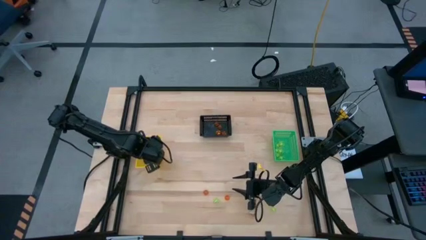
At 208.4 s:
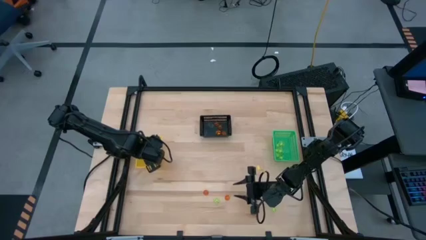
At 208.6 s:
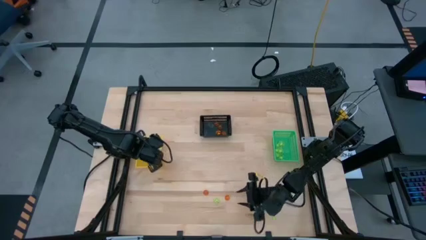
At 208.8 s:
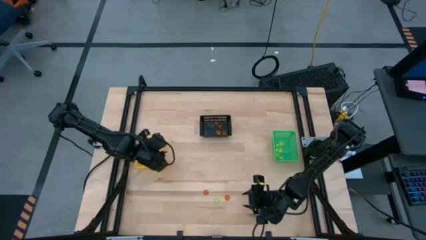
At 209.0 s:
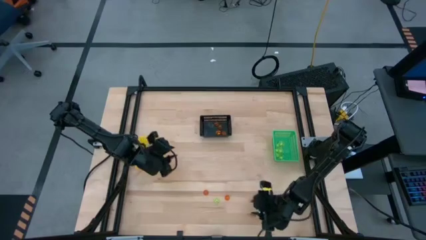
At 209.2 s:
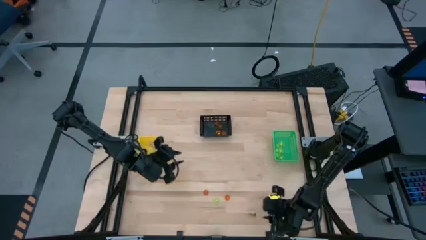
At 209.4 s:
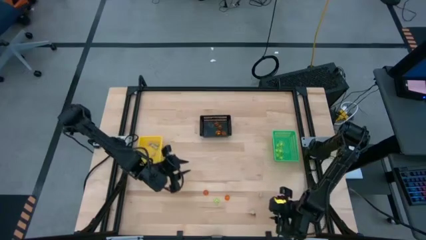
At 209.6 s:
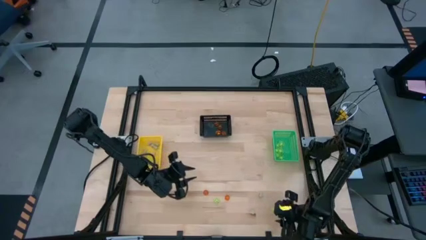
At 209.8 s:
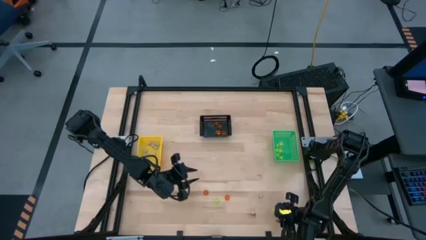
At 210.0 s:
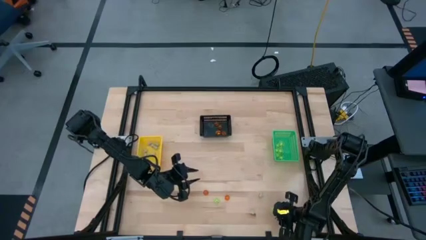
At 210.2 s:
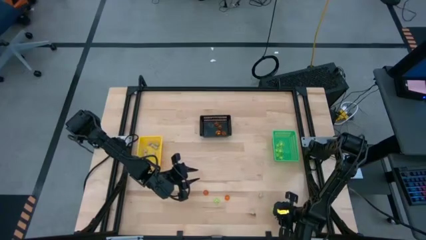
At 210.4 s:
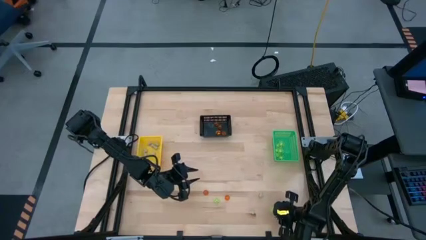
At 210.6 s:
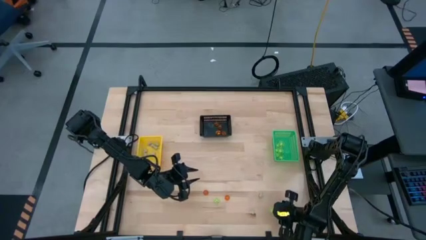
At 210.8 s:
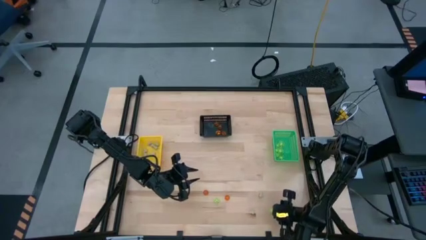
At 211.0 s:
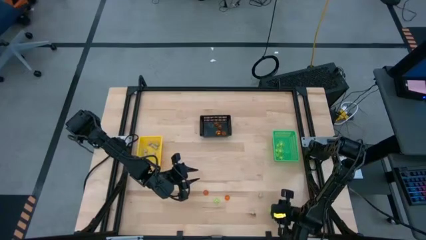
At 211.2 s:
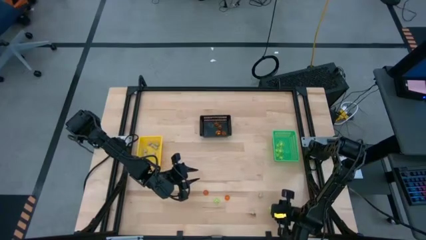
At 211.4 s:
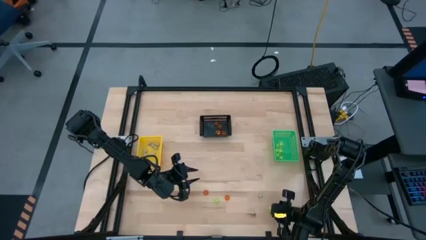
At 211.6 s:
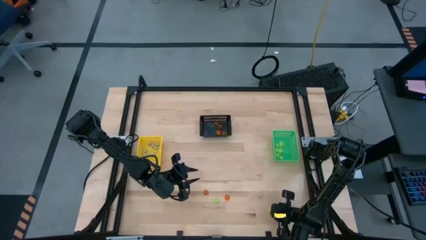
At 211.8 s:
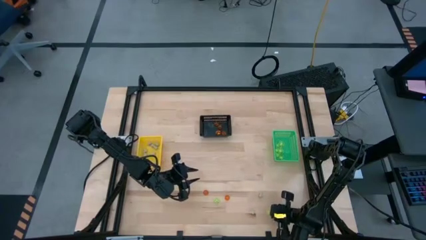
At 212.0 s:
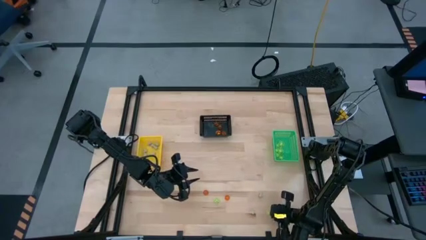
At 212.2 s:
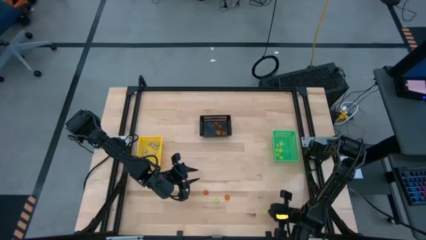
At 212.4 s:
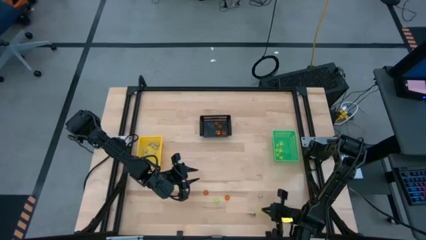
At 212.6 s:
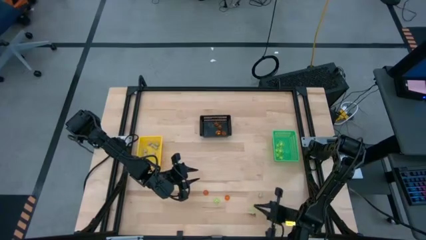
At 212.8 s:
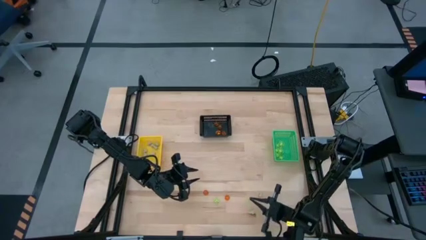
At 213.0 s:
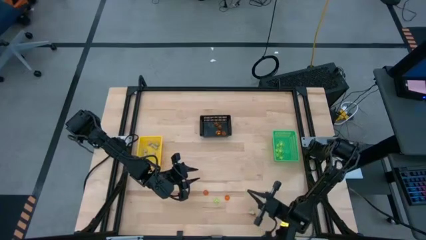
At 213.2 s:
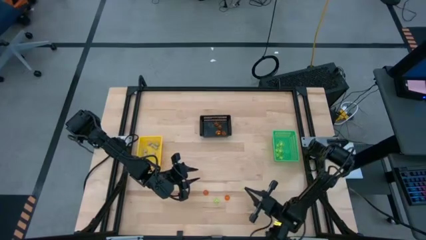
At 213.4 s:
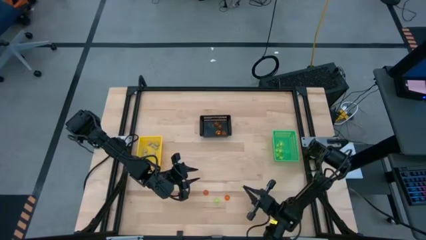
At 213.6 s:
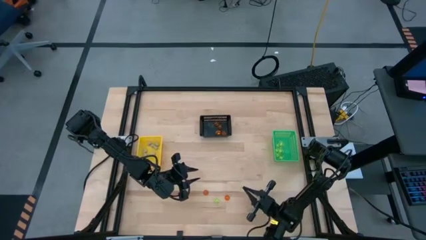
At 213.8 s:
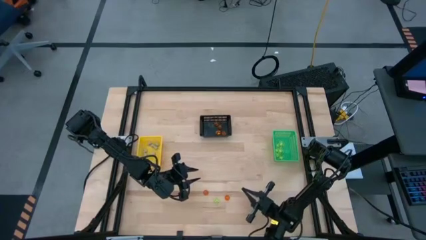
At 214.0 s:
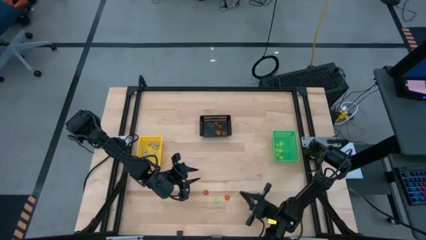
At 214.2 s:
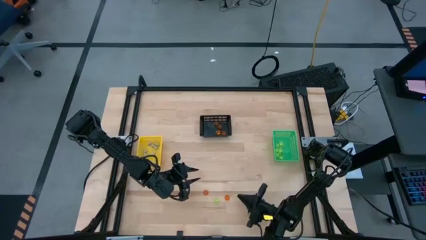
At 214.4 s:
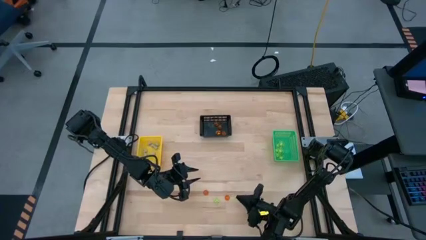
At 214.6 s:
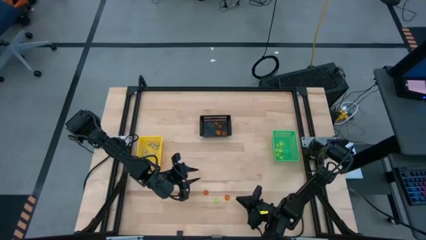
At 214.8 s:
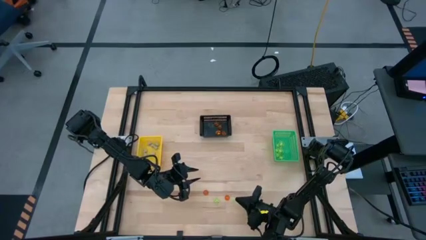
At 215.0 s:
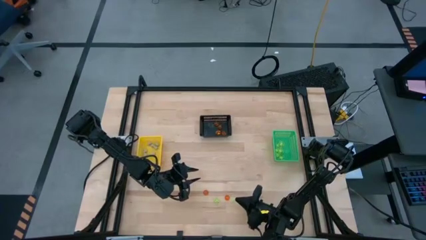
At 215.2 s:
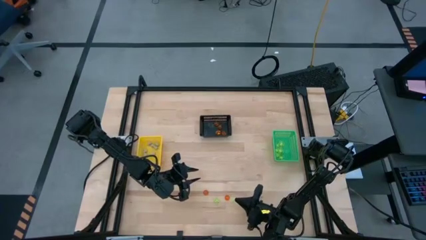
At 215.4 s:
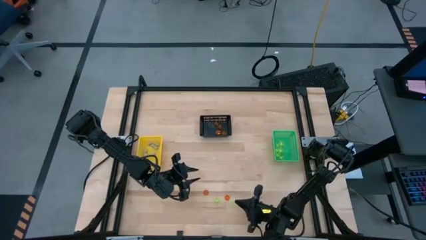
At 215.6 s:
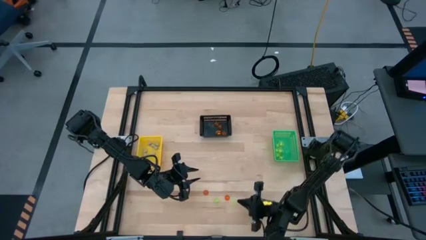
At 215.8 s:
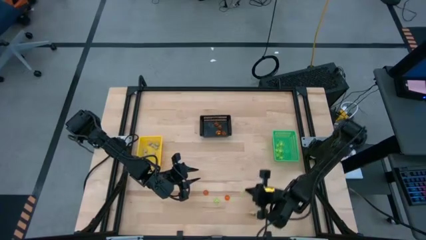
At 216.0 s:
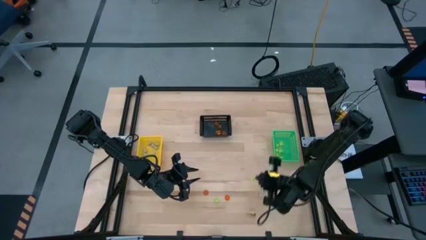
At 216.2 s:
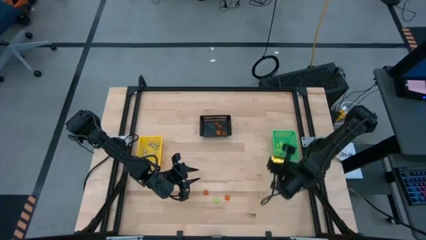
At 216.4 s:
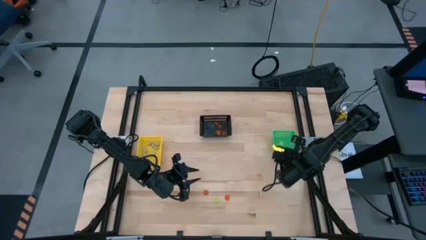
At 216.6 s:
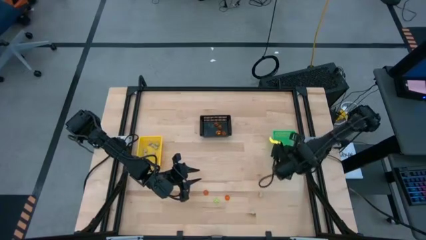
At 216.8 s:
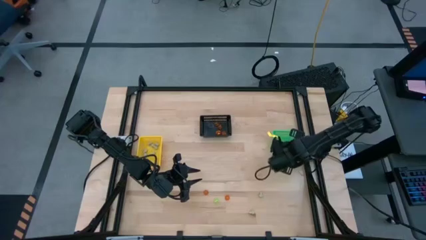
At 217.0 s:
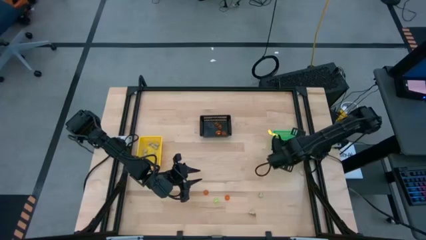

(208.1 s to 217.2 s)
Task: Sort Halloween decoration
Put the green spider toy into the green bin

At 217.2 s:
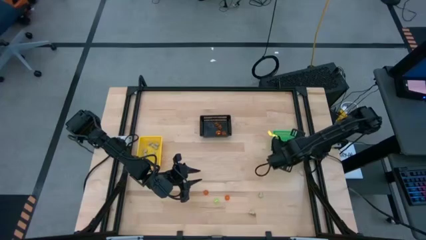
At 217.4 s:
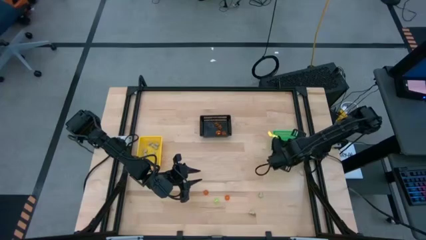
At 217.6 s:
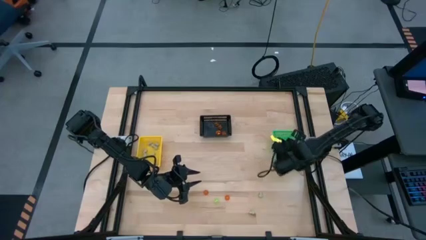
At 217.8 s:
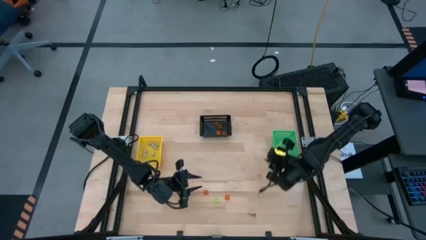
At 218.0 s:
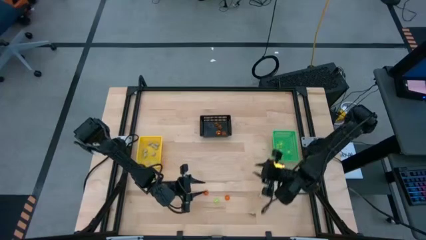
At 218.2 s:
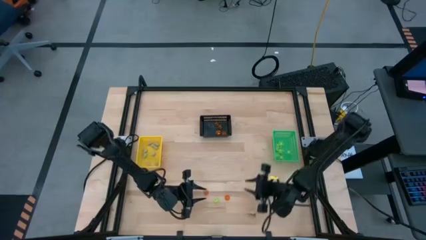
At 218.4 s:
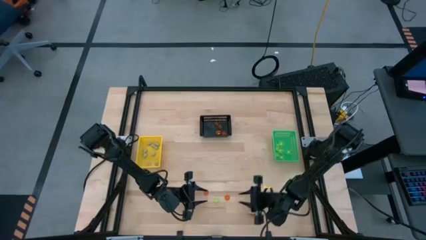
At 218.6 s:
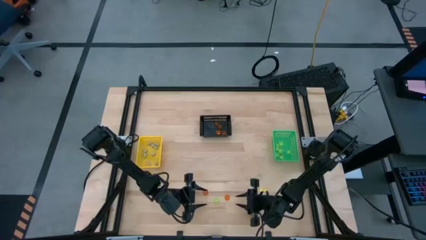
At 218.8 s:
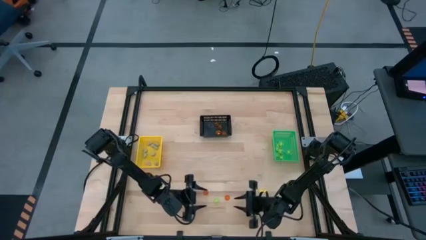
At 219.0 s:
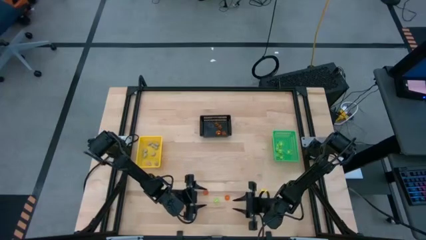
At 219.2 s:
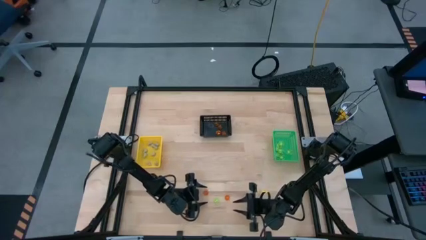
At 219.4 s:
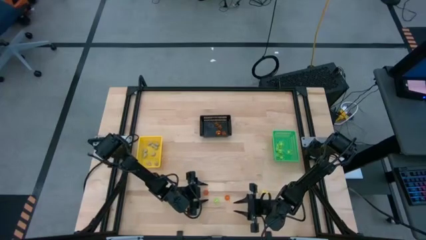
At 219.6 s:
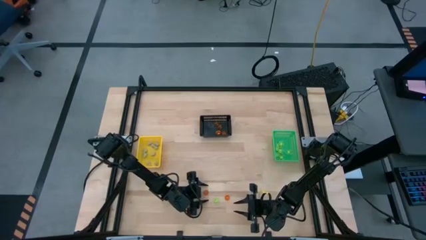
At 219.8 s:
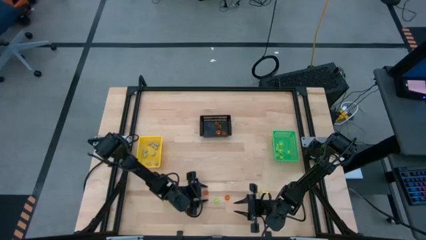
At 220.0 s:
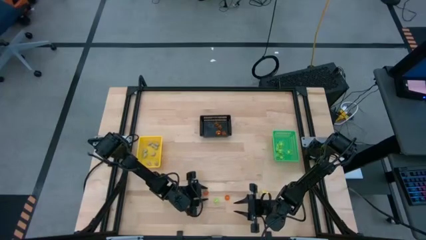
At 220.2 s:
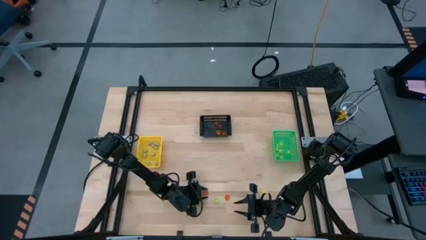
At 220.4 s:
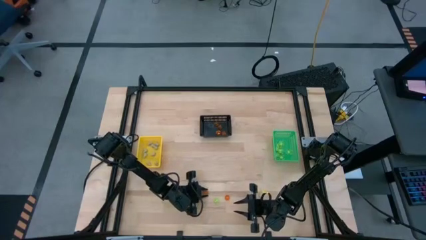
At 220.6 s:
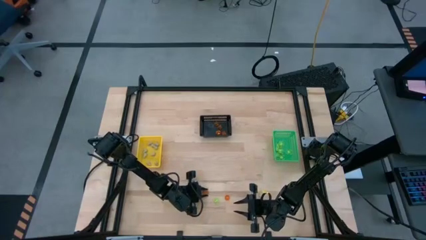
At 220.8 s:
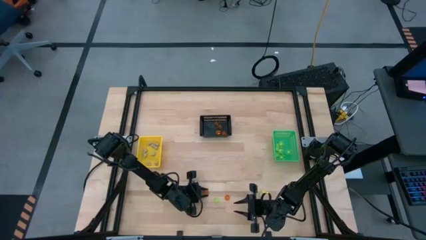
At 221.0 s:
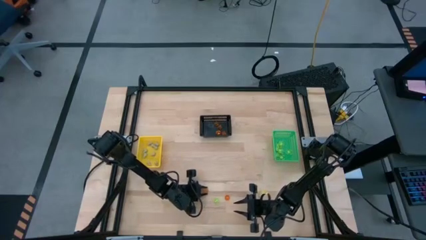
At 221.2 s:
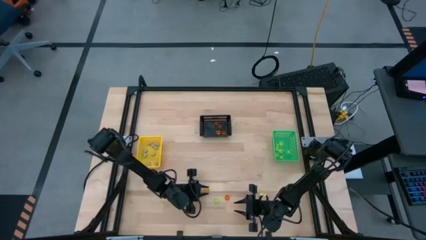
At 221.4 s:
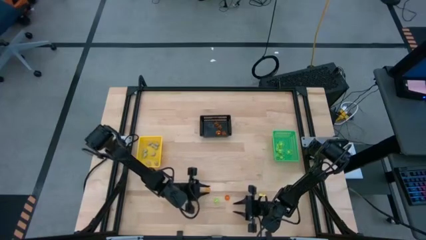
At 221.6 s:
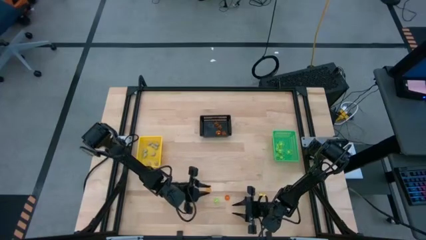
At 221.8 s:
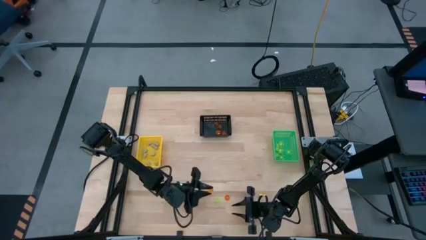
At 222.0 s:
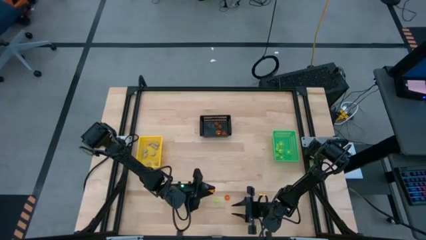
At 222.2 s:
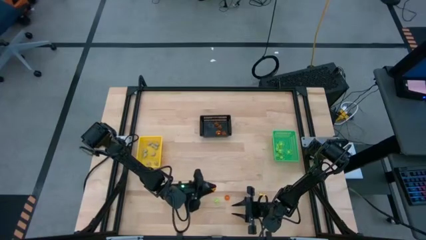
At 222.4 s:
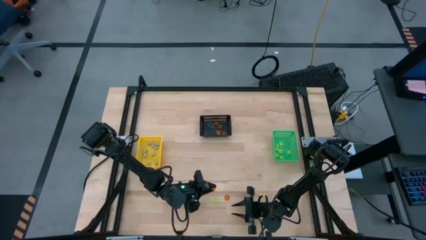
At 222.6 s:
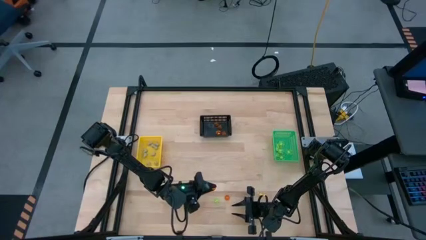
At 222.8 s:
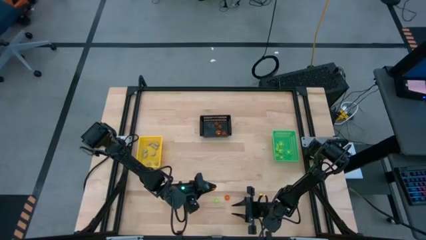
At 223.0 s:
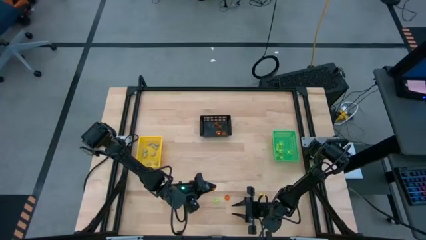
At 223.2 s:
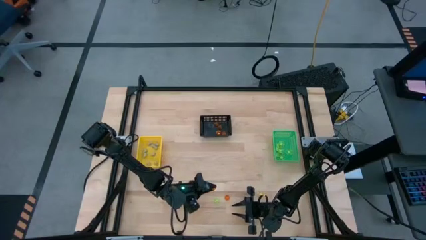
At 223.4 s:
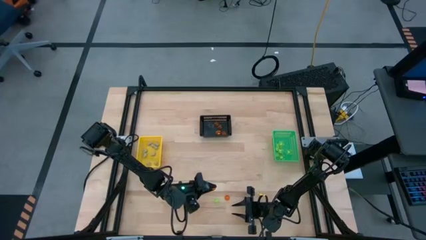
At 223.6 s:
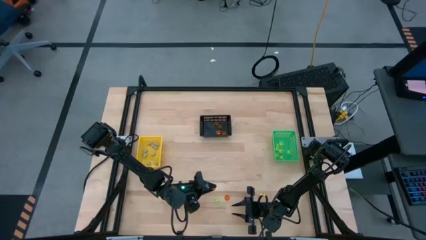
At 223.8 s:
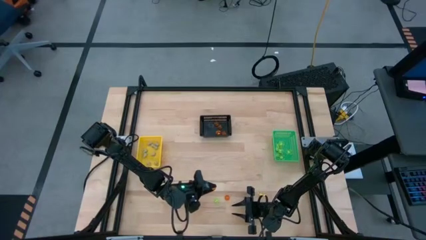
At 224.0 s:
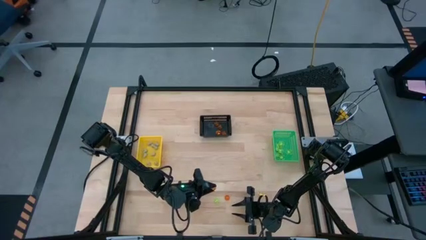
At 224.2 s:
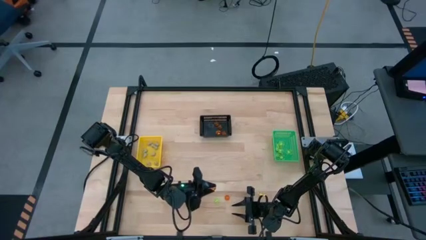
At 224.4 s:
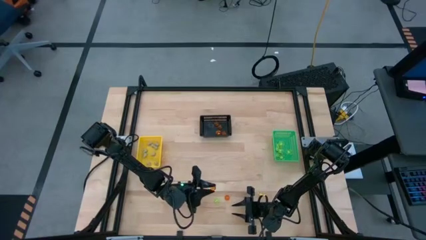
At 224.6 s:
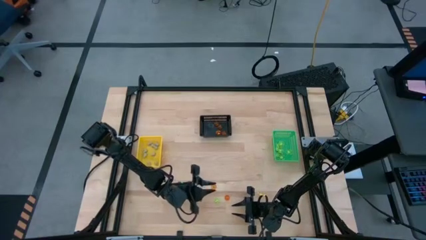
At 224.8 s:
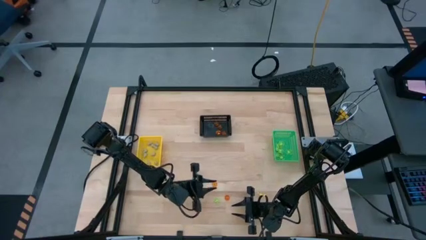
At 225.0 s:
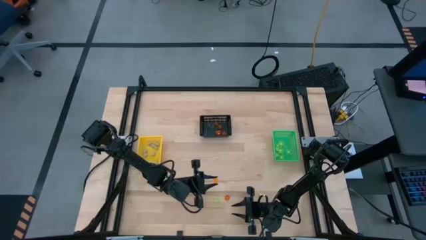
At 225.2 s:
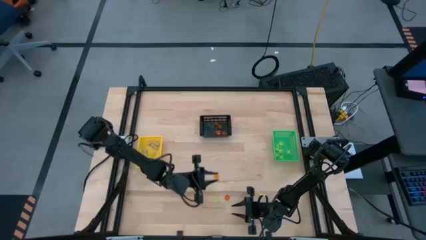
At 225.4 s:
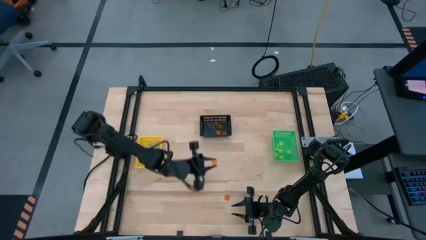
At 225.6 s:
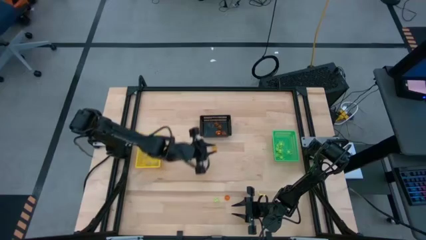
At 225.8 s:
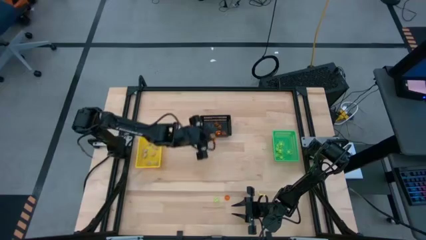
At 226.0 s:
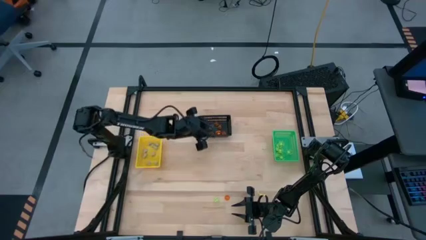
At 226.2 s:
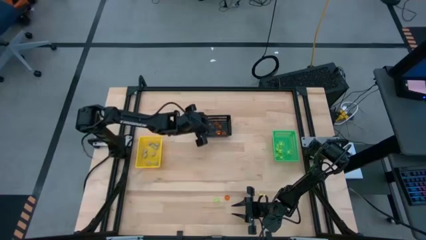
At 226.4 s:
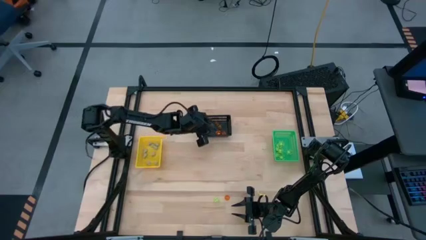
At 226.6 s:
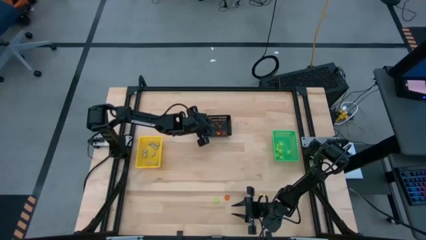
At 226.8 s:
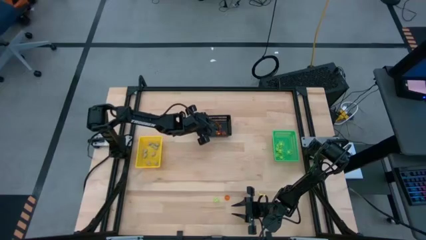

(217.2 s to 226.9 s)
Put the orange pumpkin toy into the black bin
